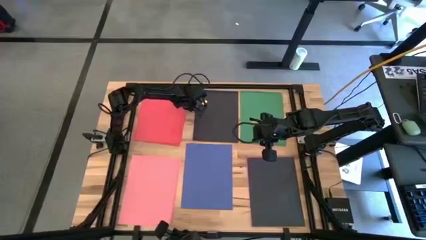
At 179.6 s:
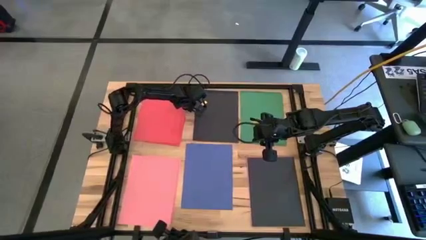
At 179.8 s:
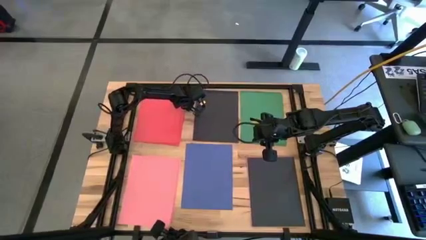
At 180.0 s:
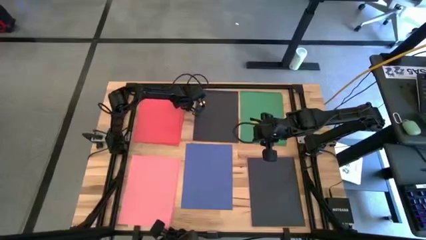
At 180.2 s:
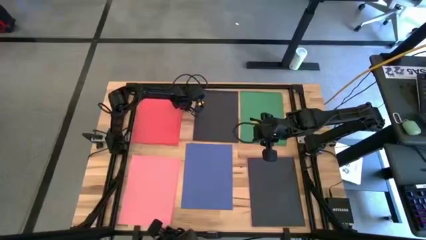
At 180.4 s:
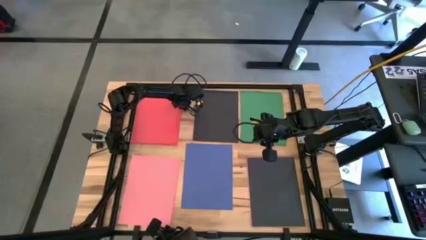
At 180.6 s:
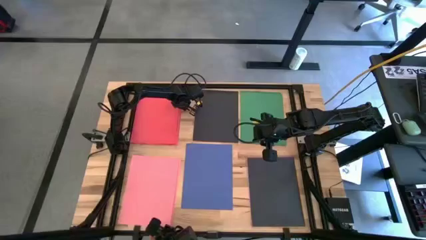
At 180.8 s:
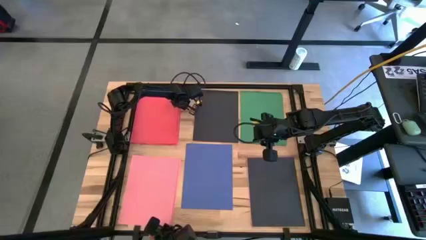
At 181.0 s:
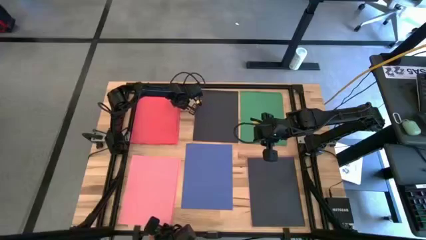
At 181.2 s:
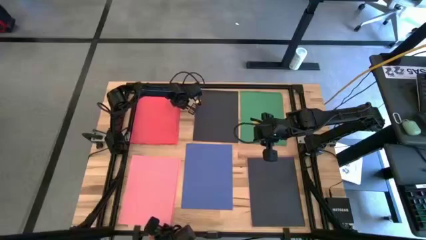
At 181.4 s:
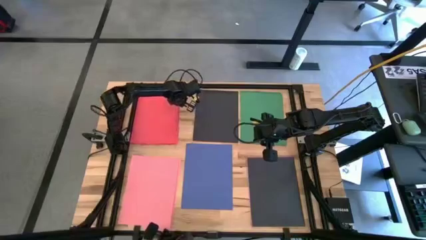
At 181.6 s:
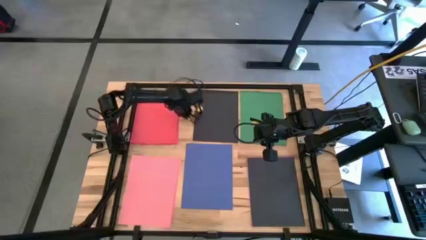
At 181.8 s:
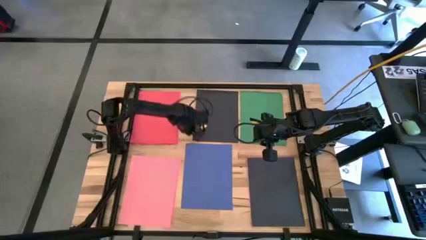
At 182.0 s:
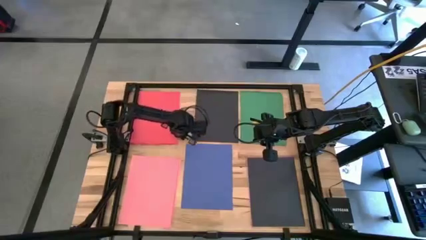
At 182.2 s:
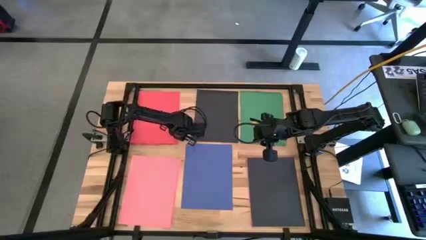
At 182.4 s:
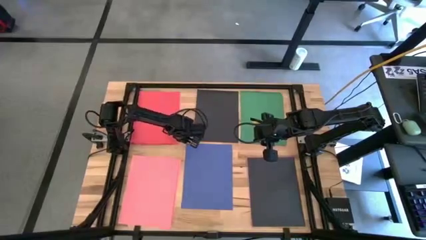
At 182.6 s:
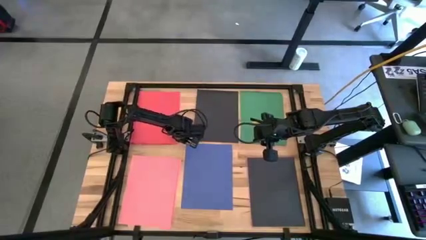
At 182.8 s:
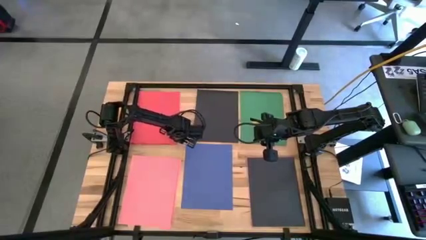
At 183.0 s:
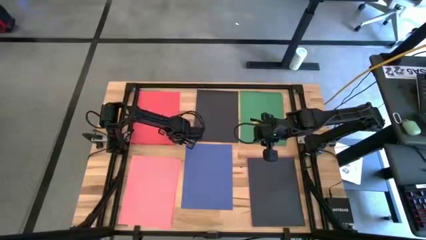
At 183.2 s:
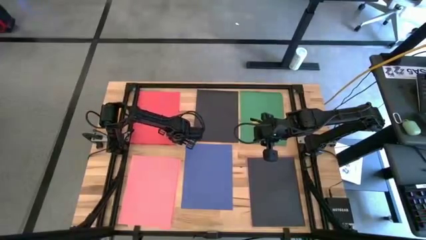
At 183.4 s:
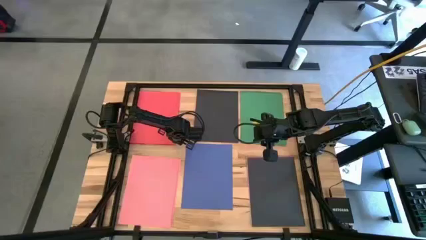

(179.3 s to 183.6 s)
Task: Organize paper
Adjust the stacked red papers

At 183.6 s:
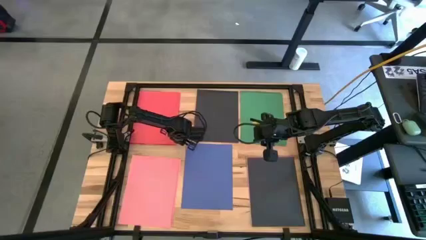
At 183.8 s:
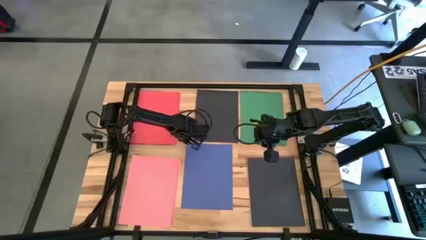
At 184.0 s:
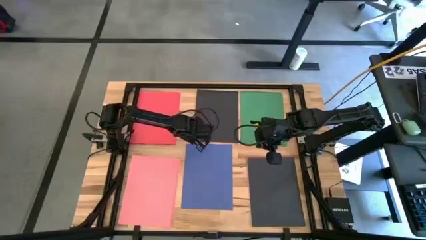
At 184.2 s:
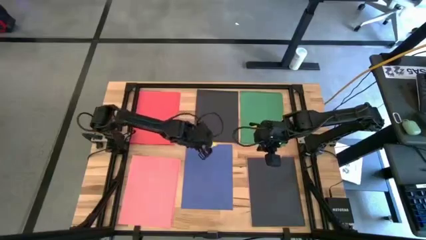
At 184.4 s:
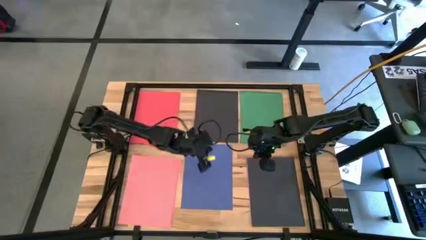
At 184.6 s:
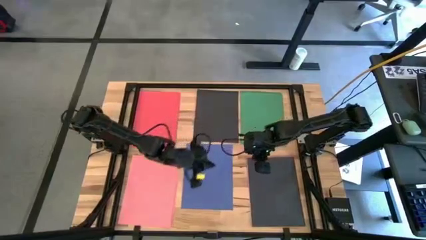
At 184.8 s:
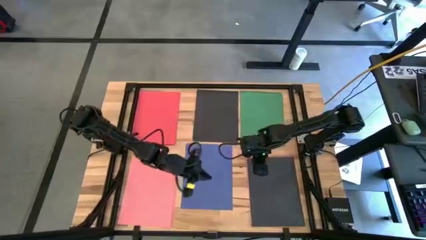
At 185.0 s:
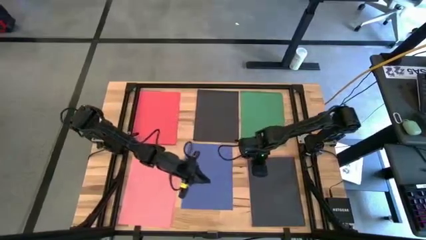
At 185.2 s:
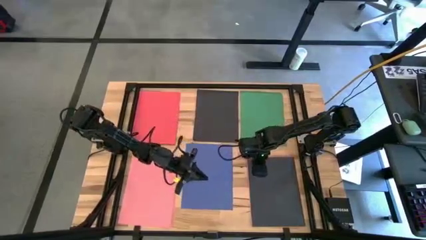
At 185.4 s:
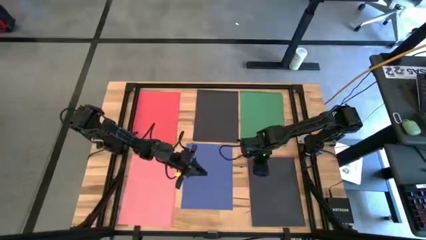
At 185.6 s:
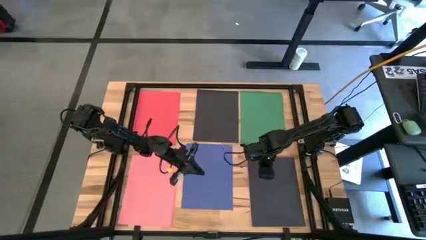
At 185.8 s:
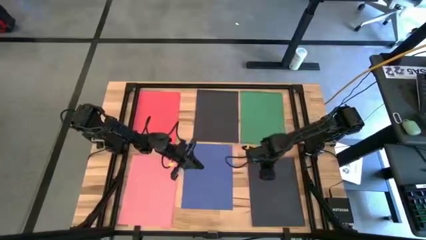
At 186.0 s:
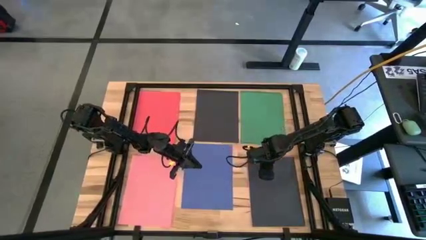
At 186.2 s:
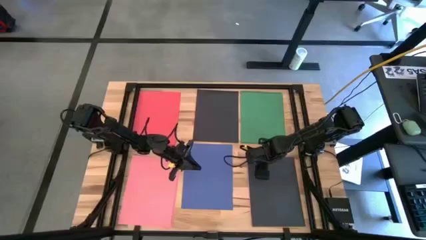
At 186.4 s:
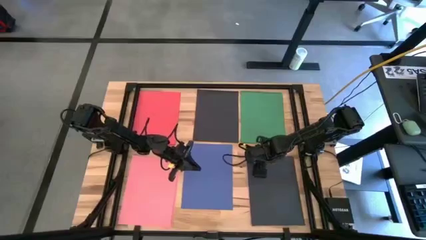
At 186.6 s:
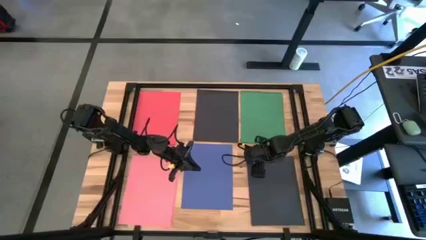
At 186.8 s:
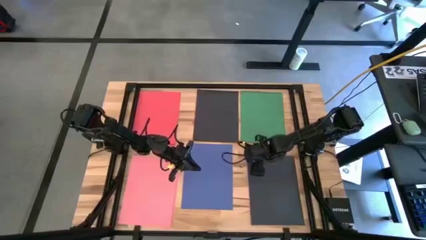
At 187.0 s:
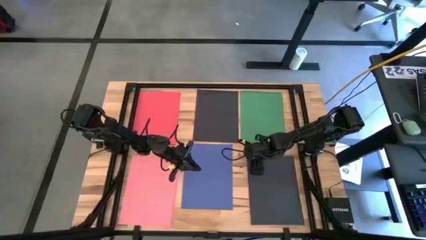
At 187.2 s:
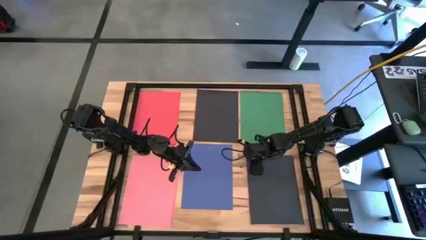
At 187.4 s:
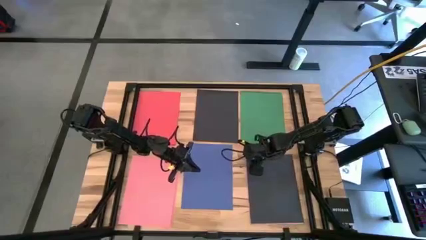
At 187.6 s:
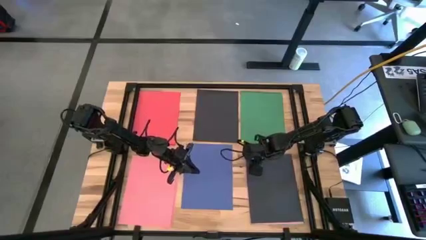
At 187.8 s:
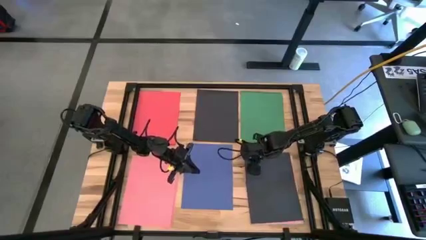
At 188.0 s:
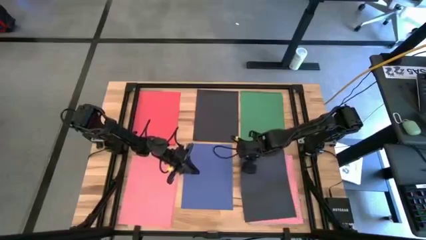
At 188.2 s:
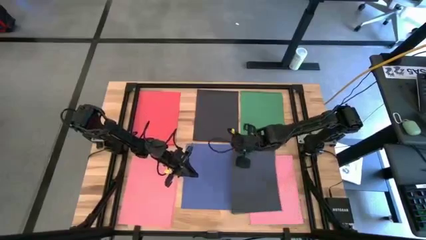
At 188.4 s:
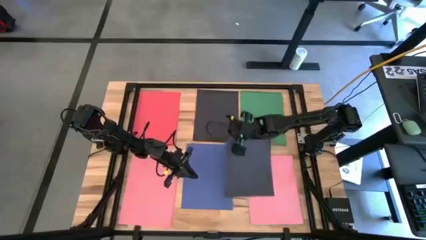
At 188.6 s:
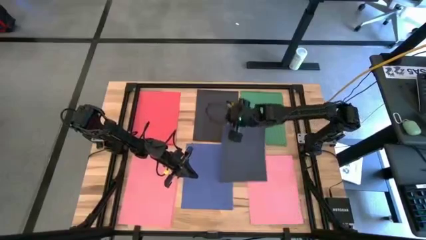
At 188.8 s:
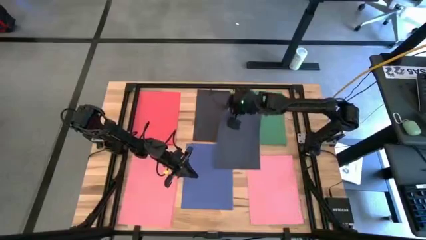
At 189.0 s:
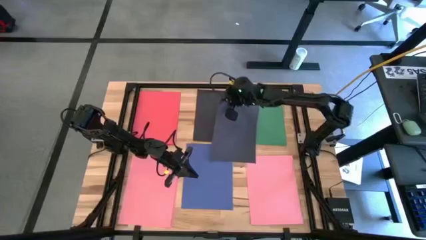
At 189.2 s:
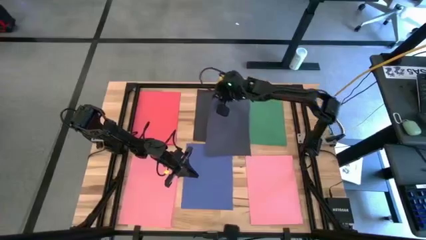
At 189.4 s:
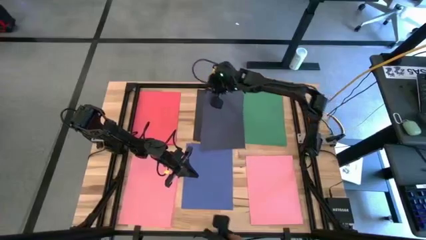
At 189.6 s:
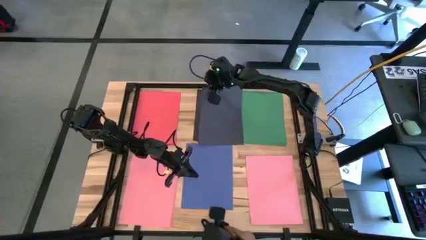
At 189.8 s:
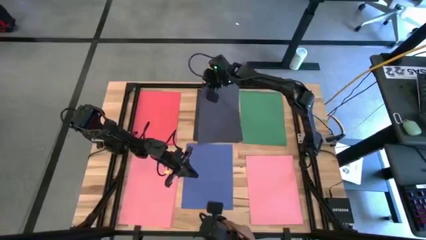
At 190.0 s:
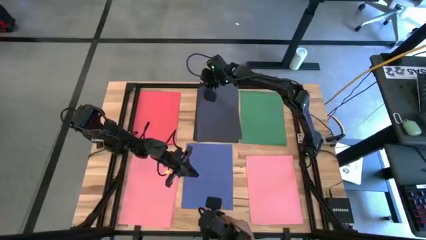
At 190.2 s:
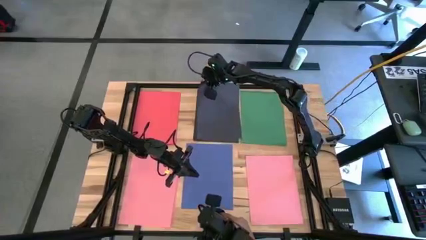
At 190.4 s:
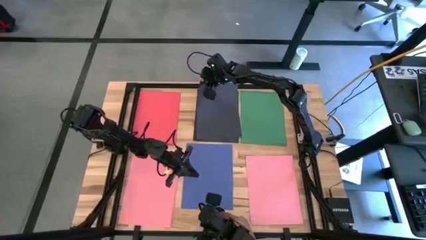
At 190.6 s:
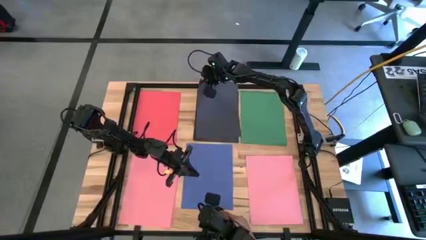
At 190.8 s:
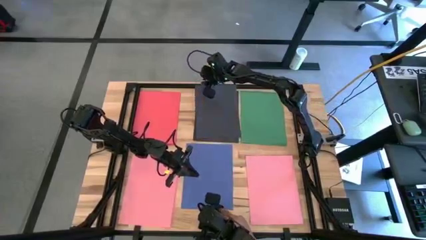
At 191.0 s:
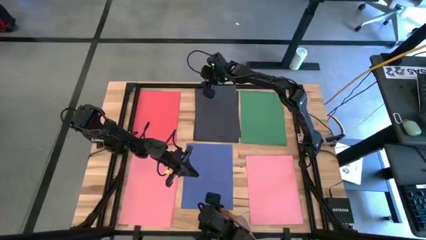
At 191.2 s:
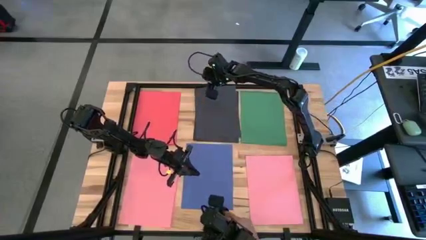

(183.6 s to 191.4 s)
Stack the black paper on the stacked black paper
